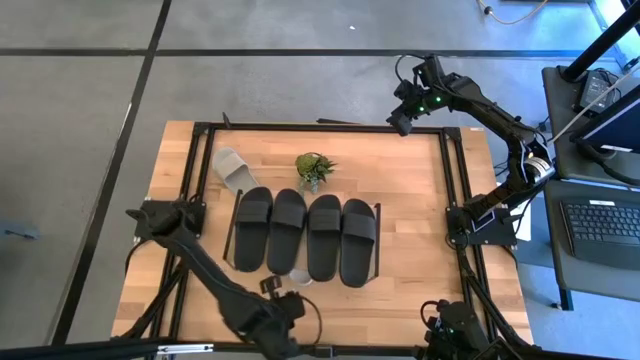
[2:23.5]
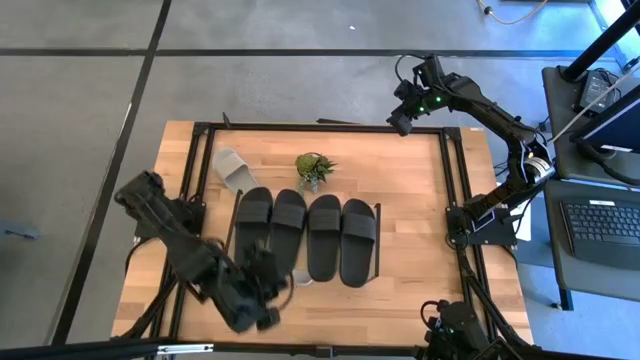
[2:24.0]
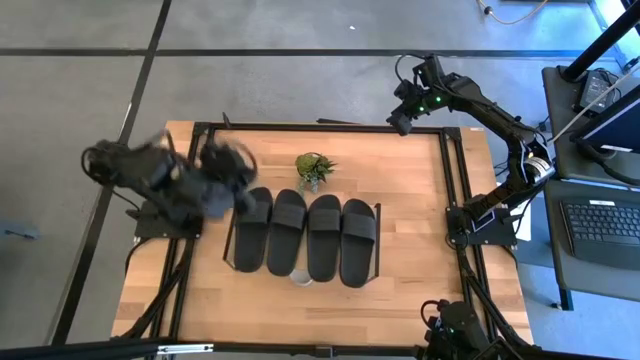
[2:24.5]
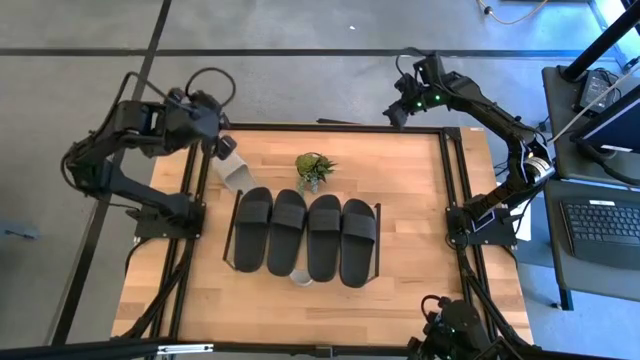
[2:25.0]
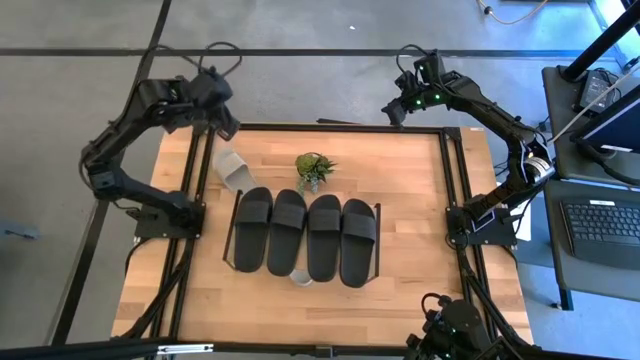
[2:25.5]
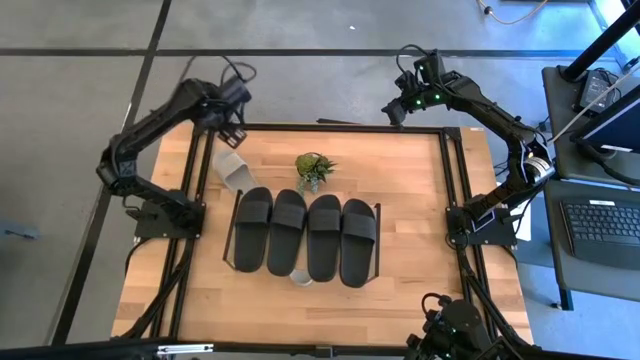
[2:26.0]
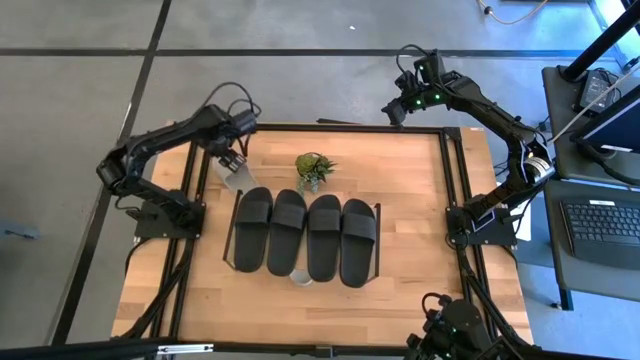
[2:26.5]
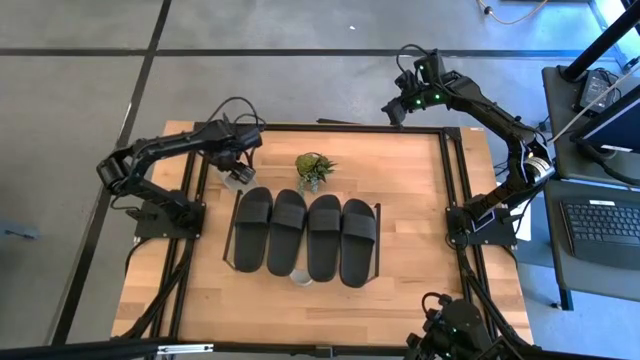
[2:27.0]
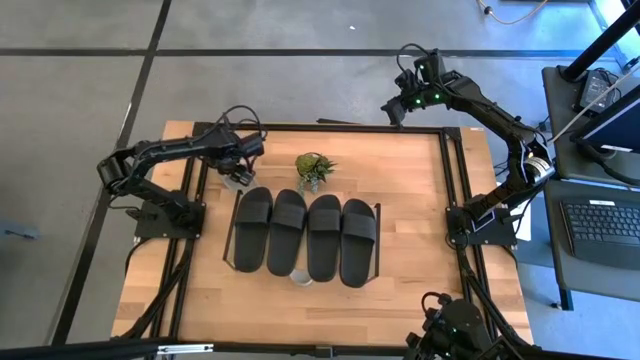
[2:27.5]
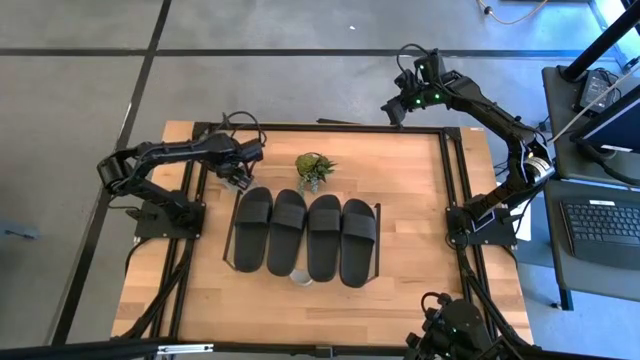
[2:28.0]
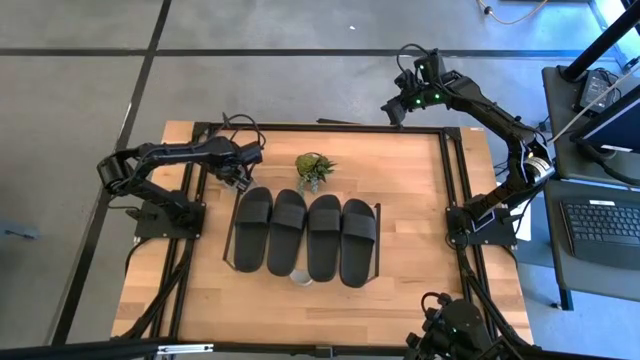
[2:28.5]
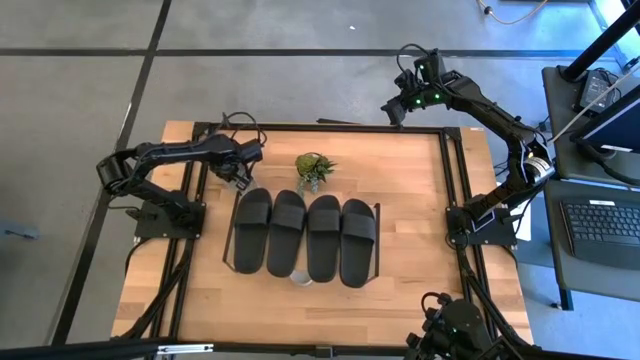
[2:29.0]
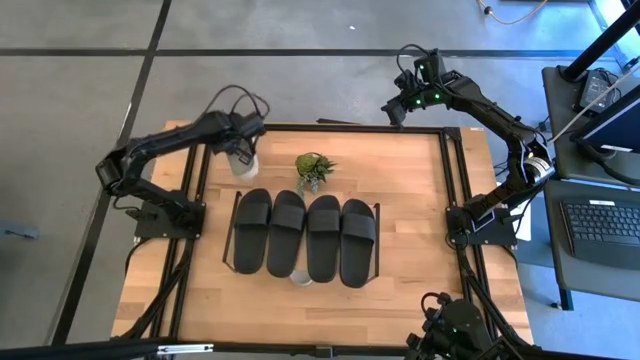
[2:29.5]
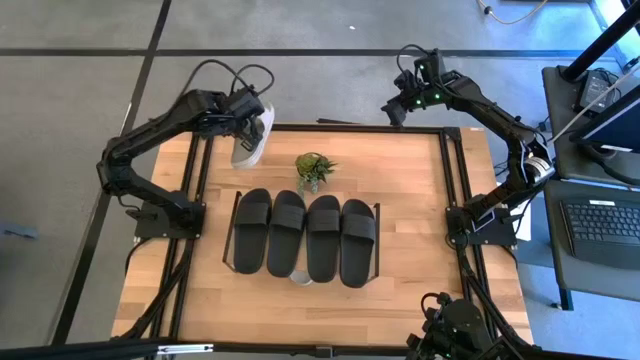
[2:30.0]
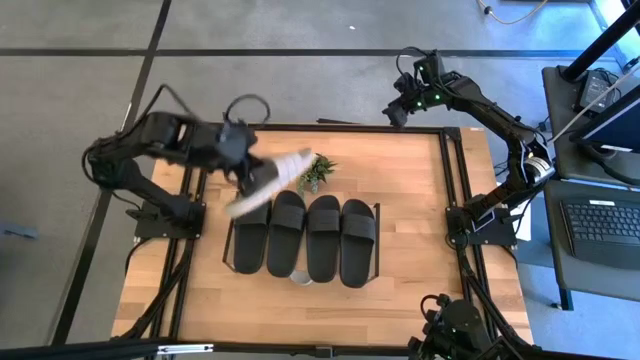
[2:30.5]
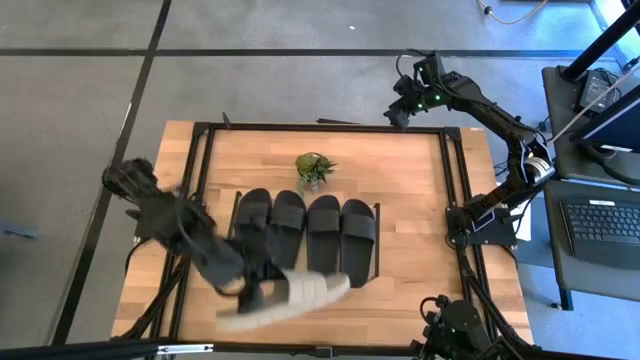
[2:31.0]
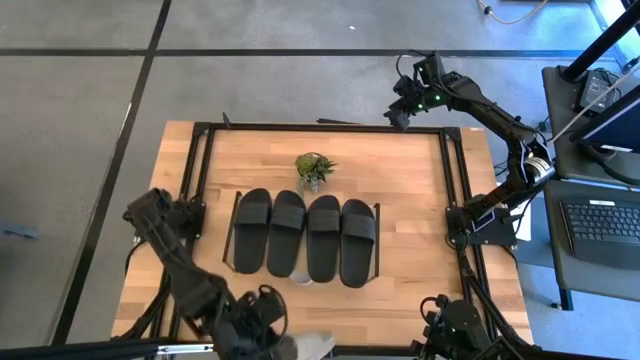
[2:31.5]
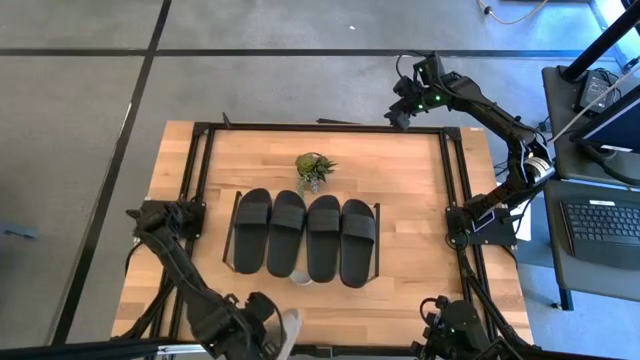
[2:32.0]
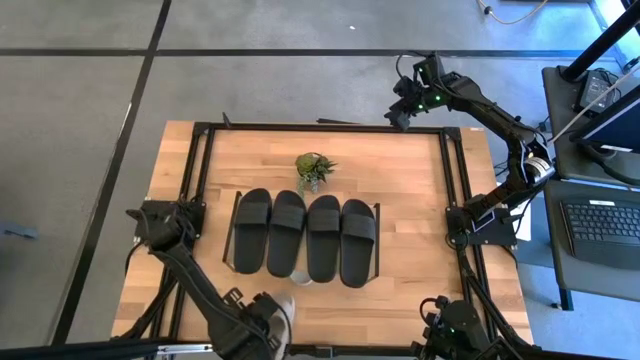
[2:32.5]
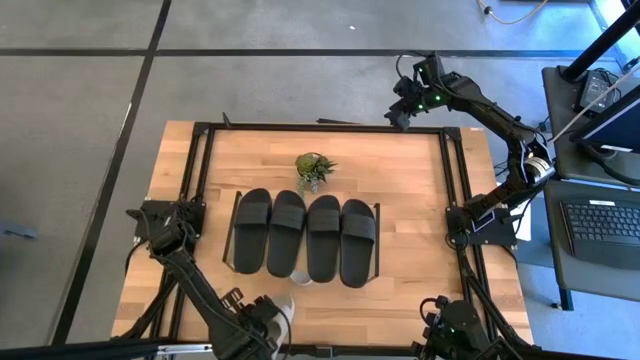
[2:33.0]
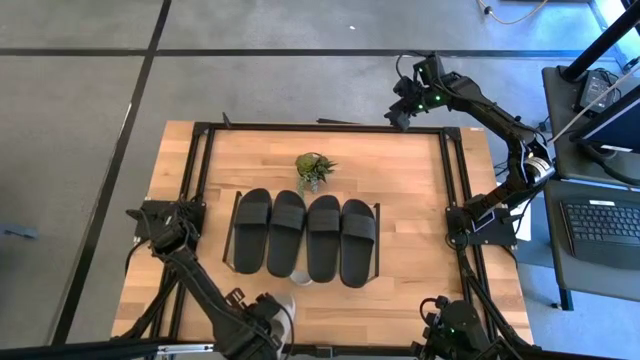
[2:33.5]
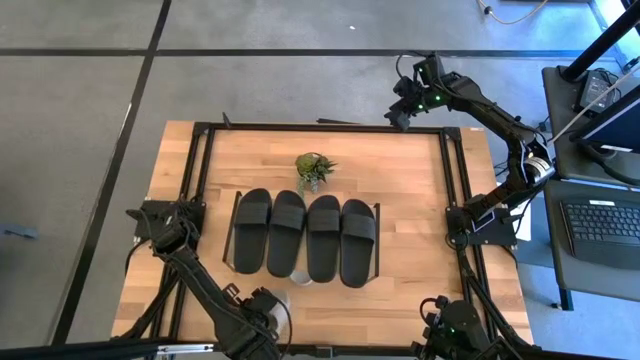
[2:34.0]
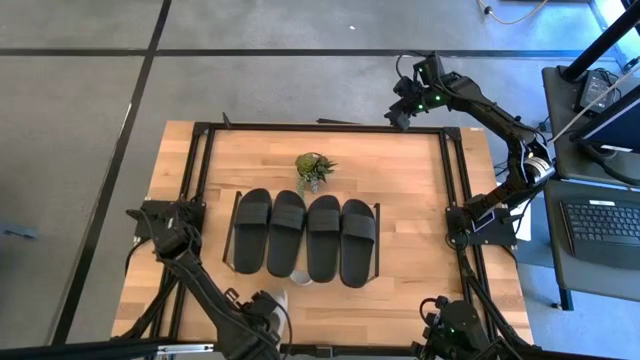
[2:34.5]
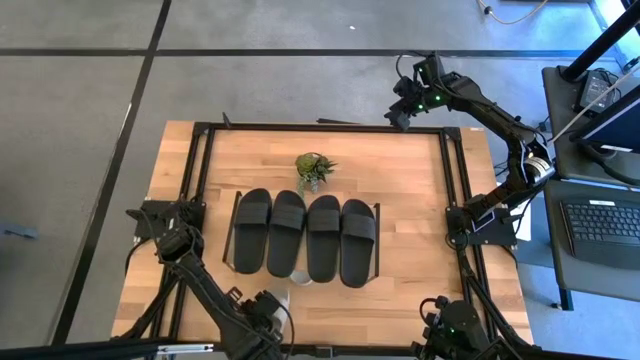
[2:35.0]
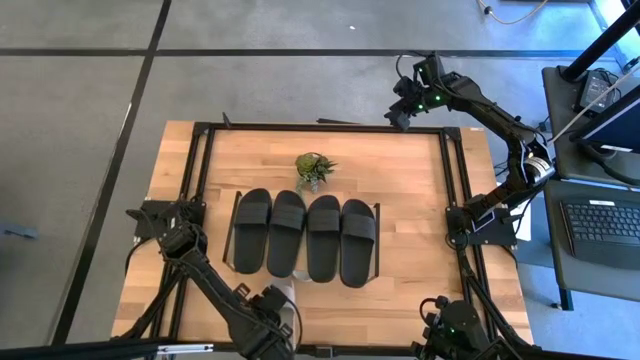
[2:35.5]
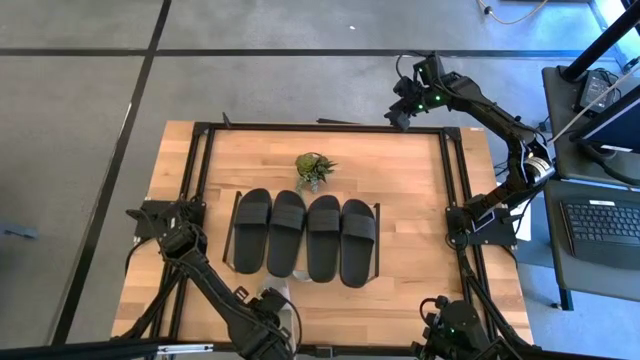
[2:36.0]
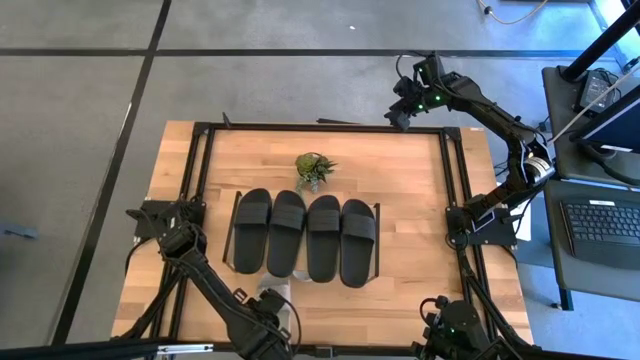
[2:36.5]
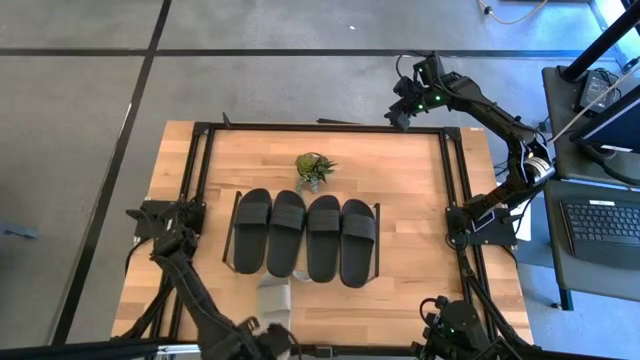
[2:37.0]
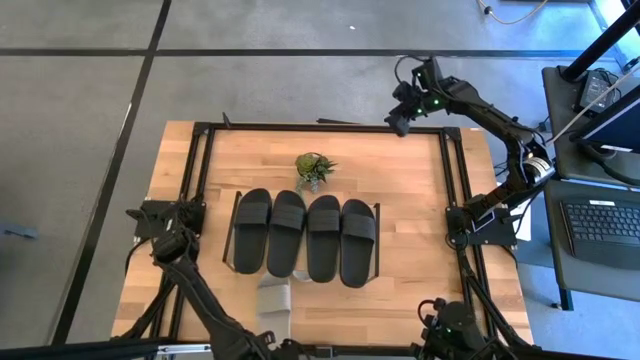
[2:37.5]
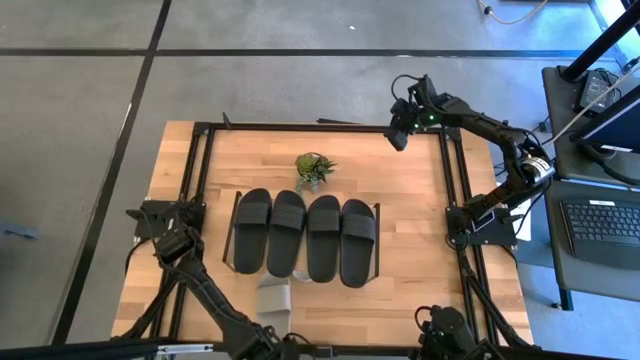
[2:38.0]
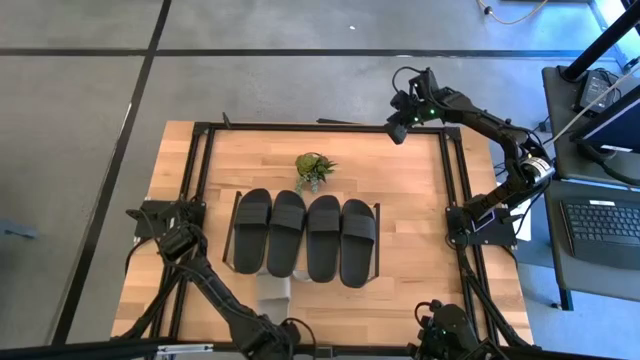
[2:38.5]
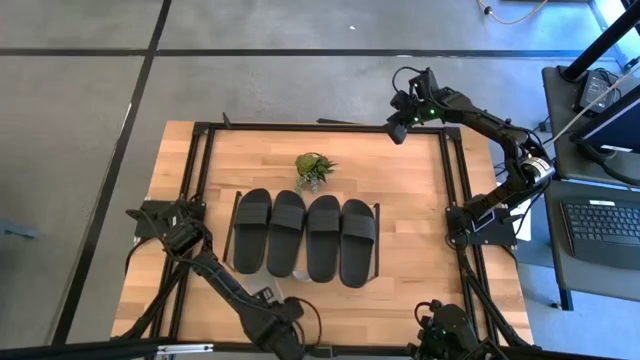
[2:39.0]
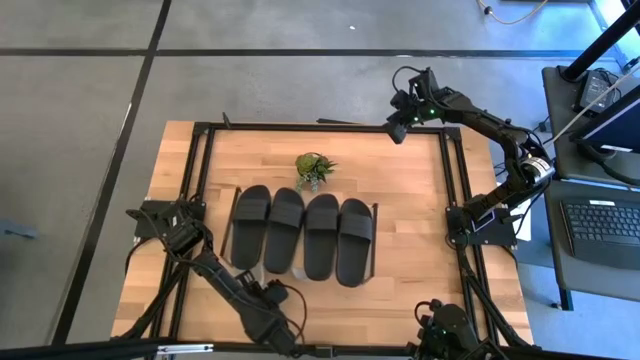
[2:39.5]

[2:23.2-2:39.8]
Task: Pick and place slides into the shelf
Put the white slide under the shelf

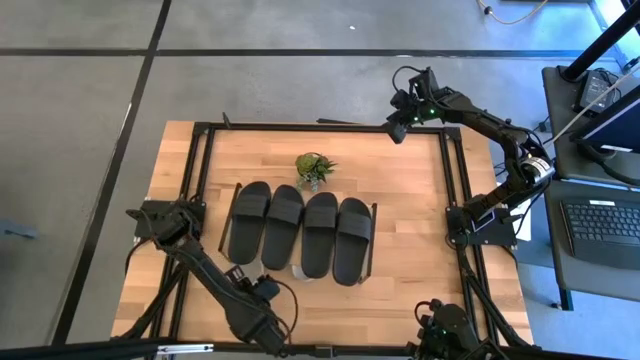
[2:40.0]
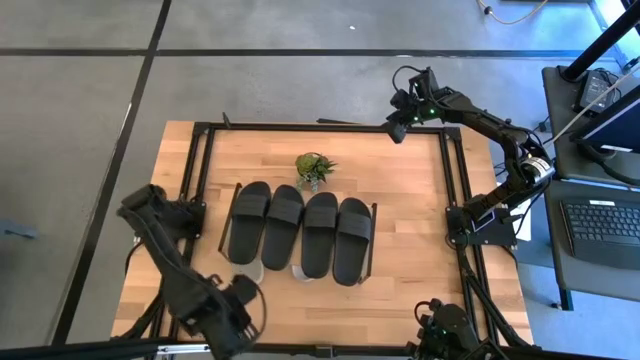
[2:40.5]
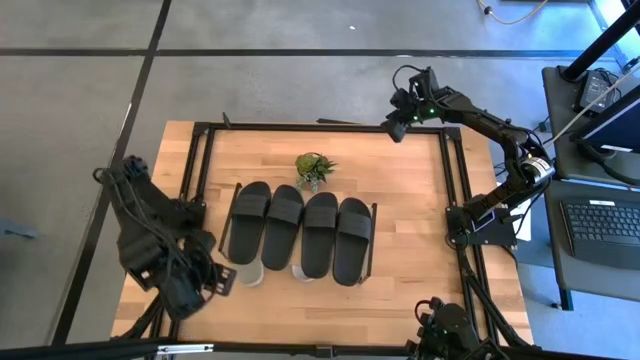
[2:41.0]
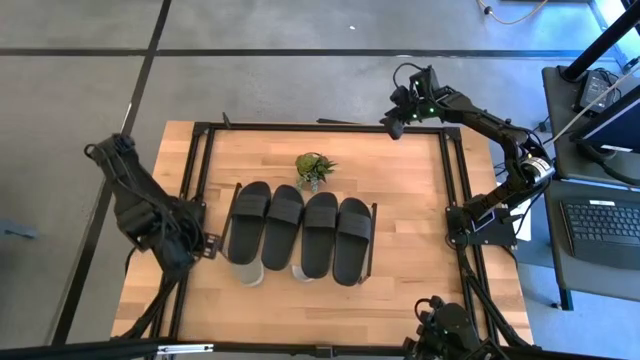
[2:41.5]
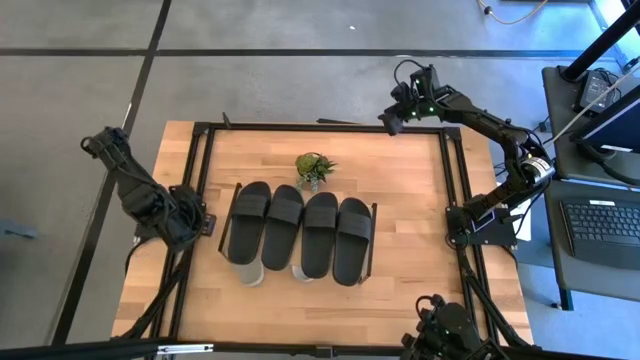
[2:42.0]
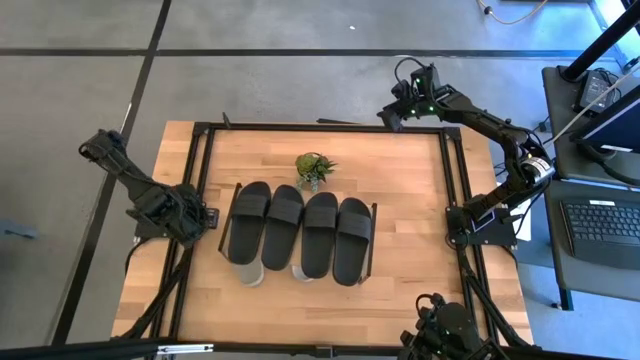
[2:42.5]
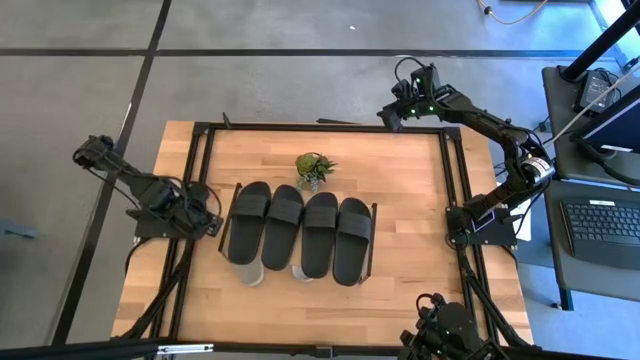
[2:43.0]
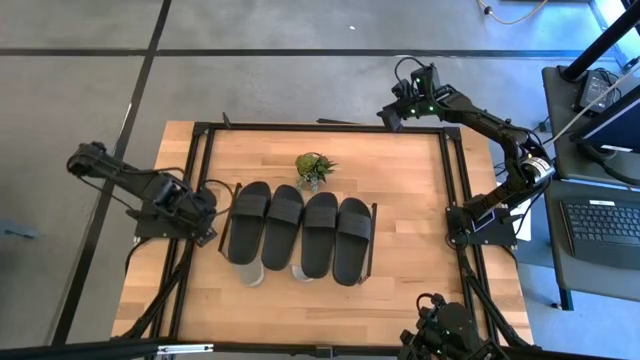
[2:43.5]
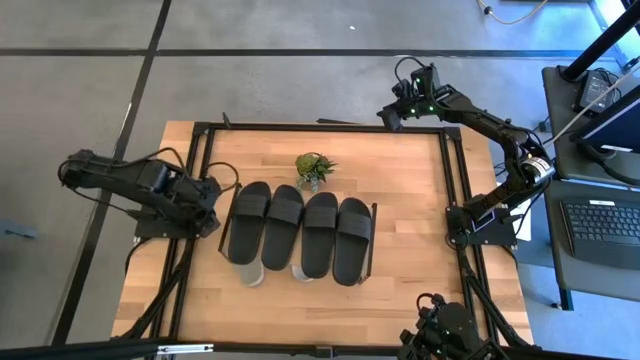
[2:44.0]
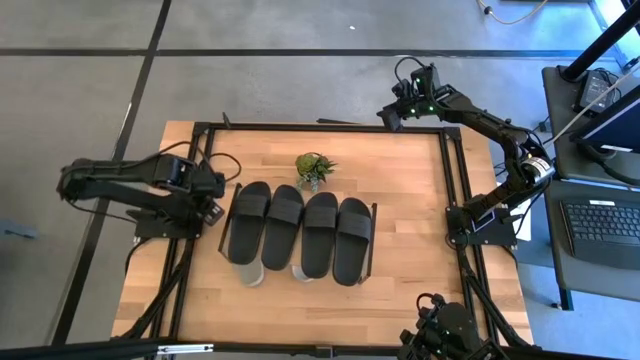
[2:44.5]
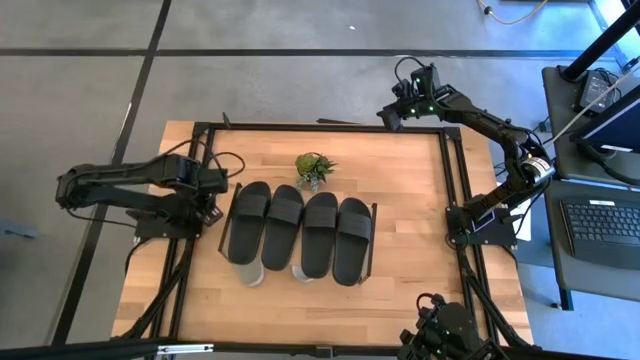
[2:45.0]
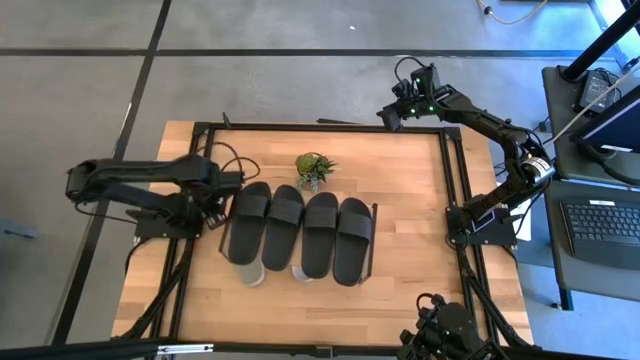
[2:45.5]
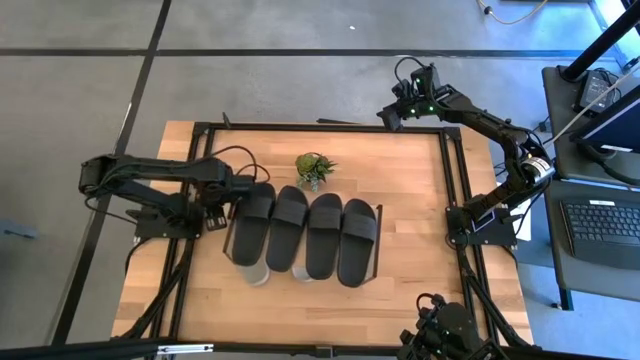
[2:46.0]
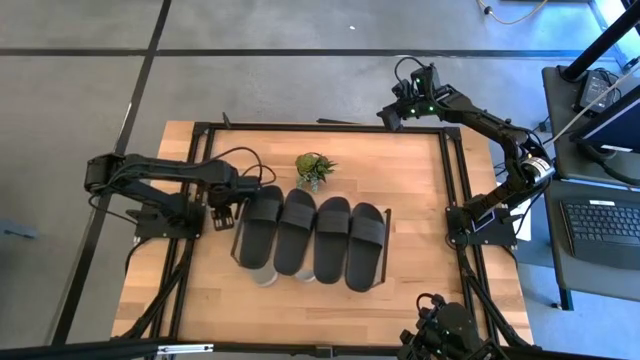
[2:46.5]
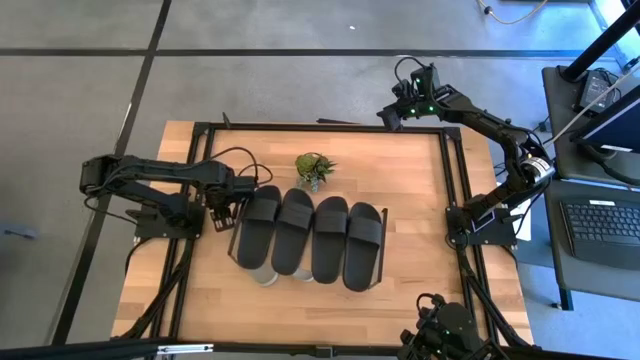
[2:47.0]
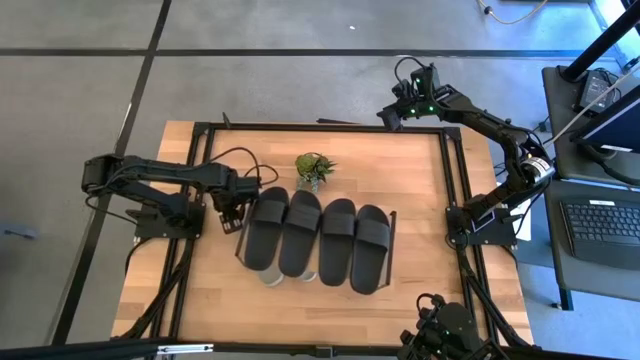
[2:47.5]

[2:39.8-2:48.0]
Adjust the shelf
